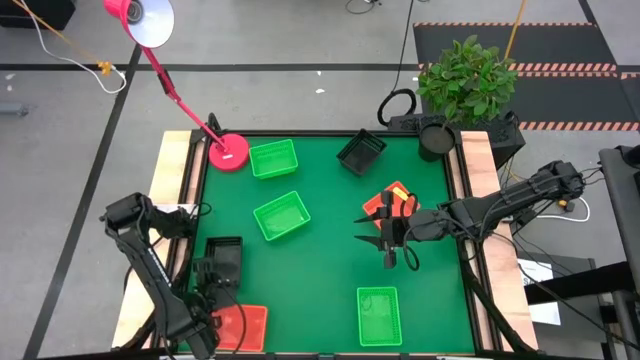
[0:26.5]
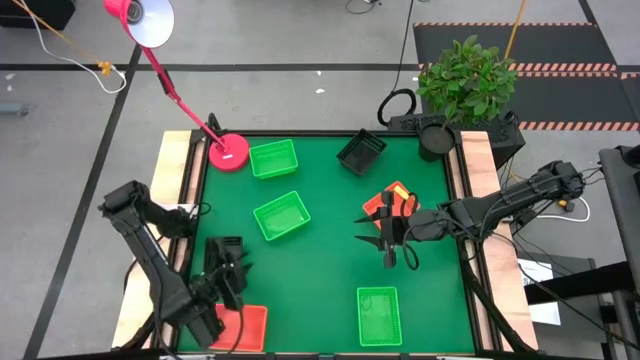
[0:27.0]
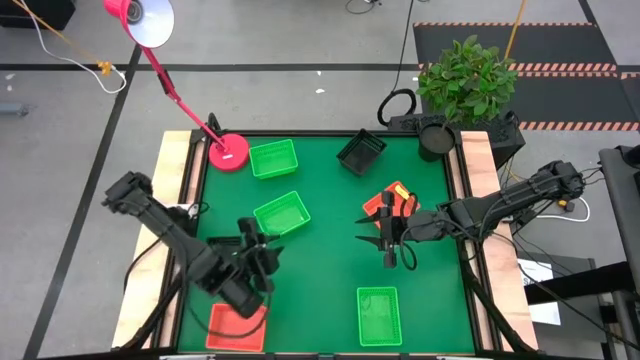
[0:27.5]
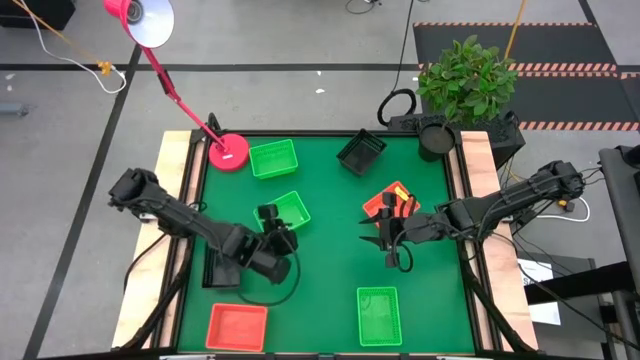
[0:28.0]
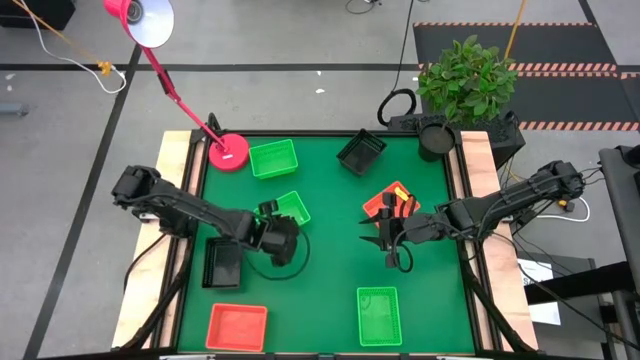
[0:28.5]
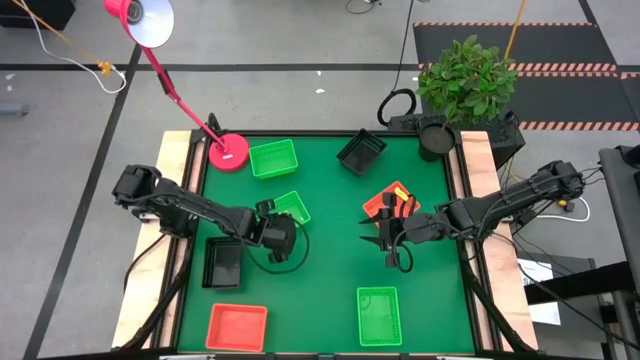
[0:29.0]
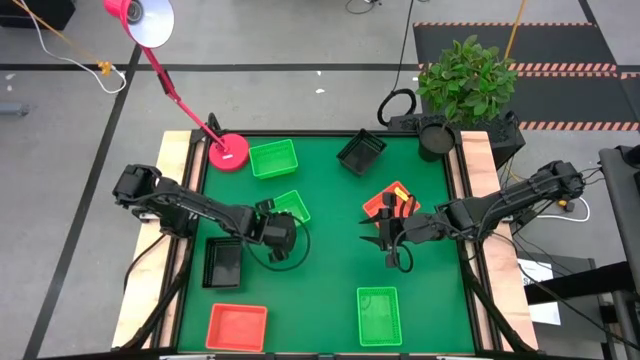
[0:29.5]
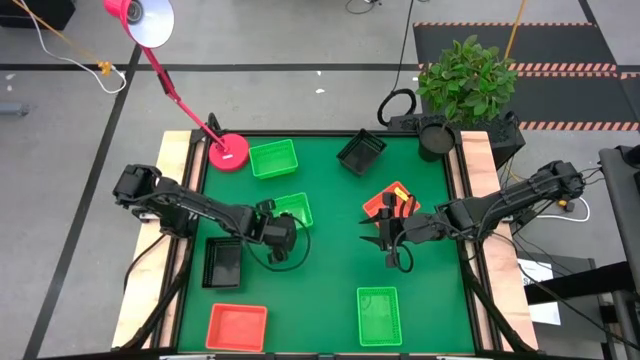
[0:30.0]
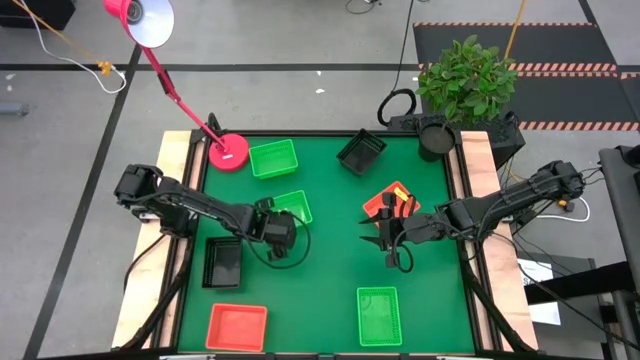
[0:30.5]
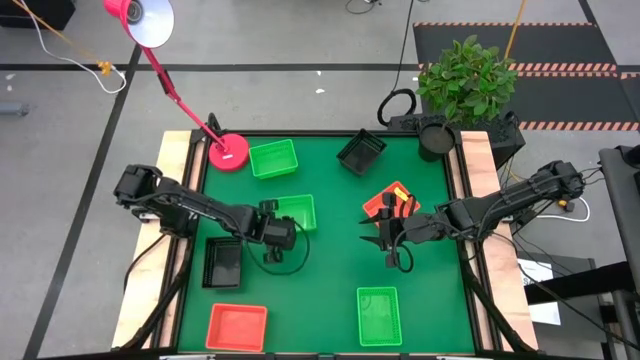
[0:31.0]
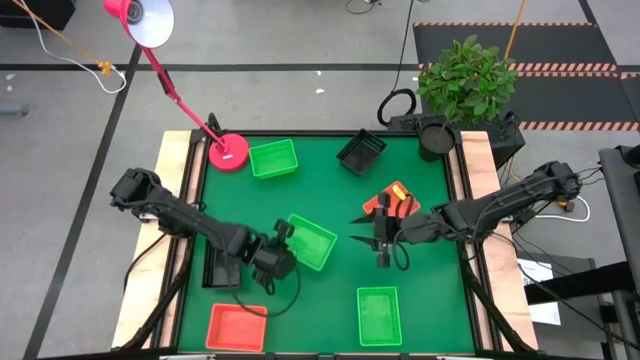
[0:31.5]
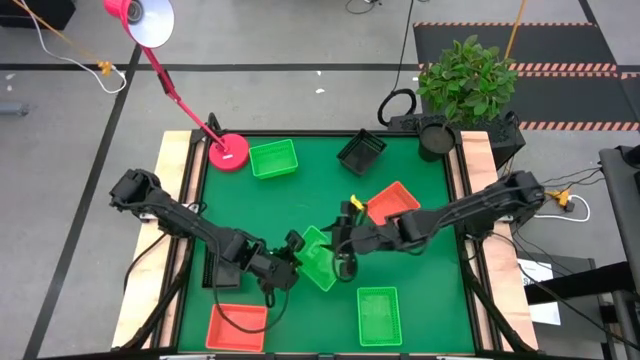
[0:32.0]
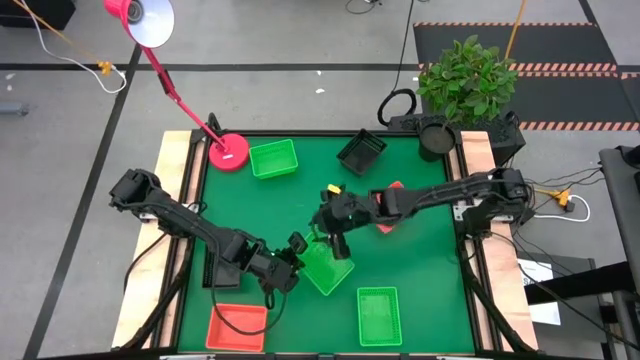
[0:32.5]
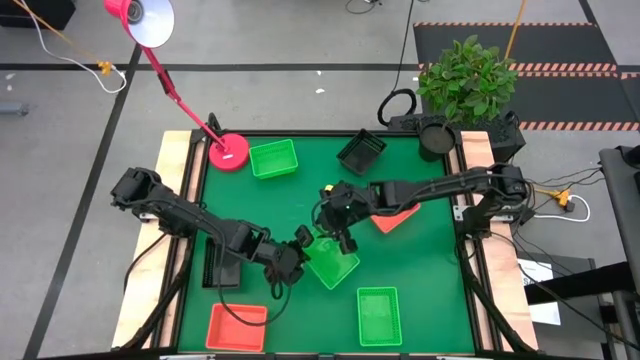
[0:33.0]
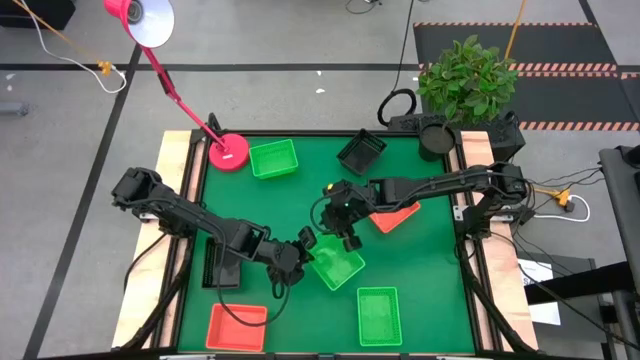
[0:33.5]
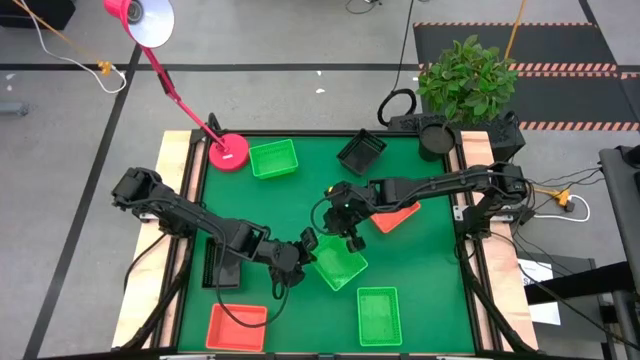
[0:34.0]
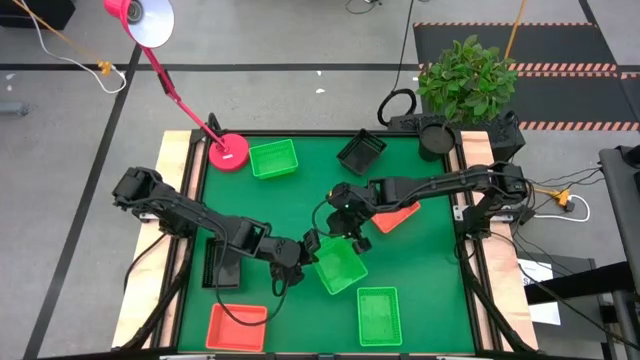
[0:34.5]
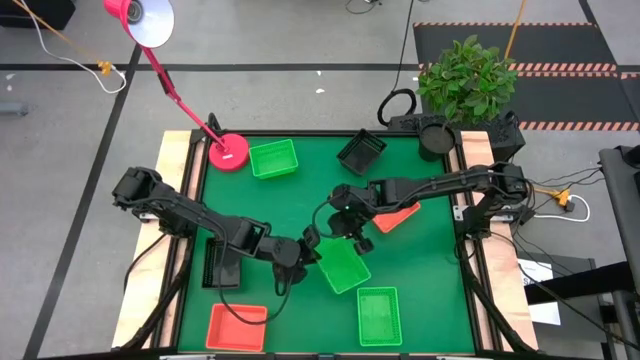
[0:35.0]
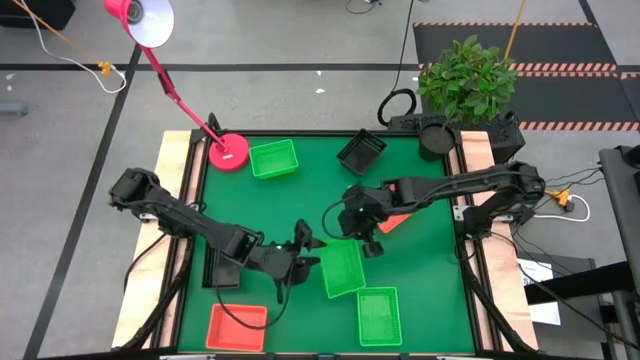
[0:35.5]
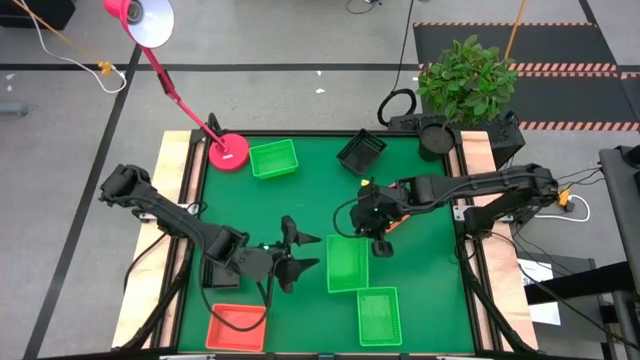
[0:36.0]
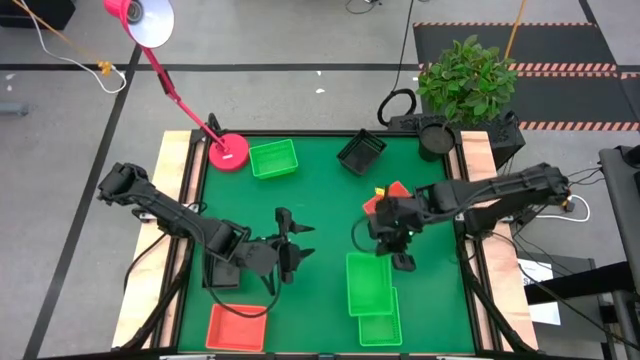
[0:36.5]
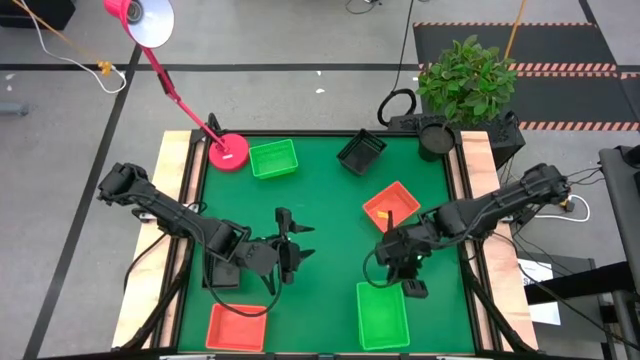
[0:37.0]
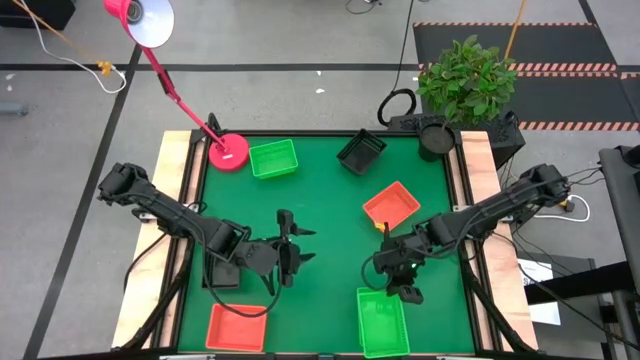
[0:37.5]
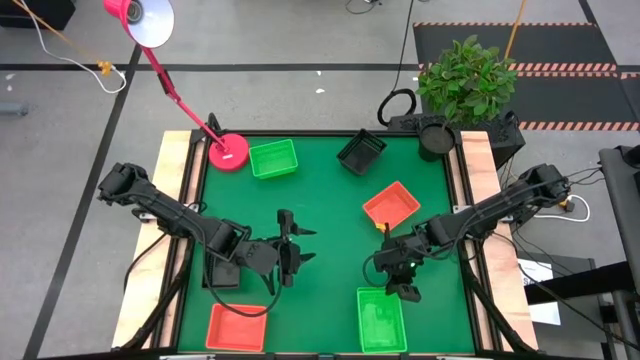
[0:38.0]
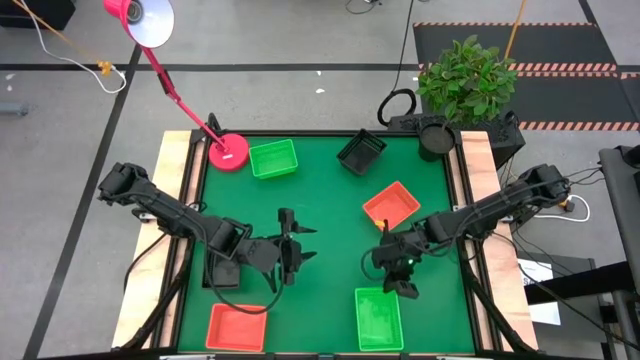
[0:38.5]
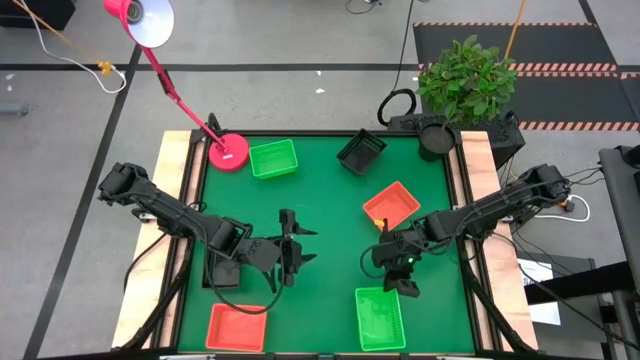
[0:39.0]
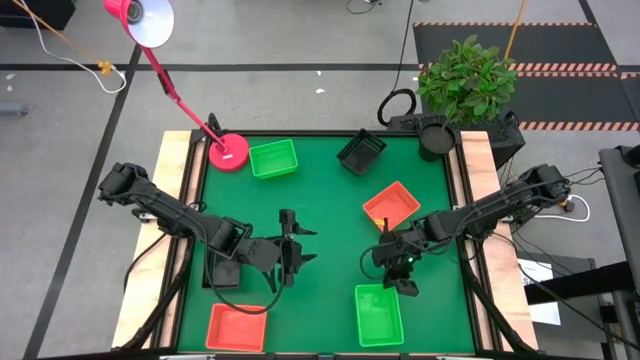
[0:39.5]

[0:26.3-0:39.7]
Stack the middle green bin on the bottom green bin

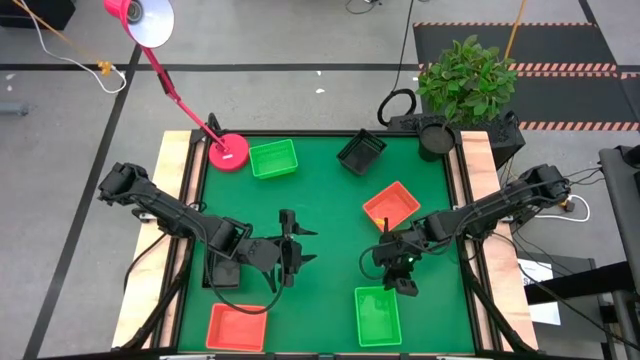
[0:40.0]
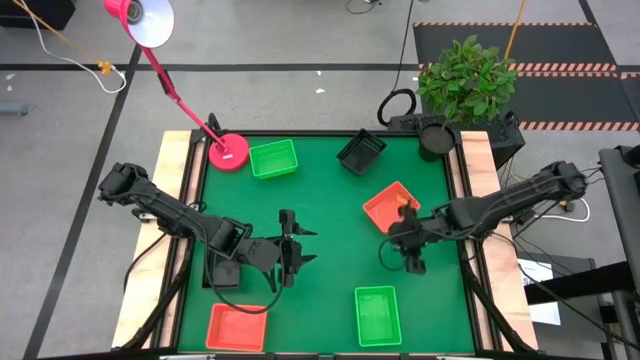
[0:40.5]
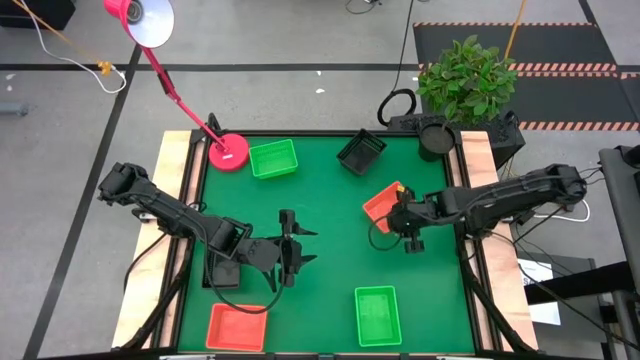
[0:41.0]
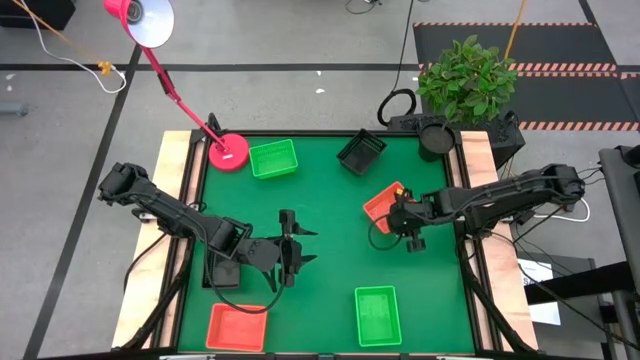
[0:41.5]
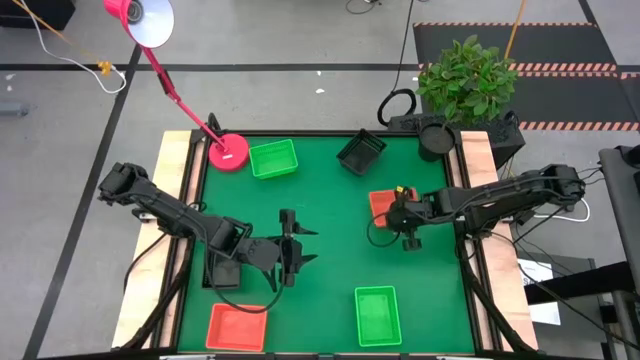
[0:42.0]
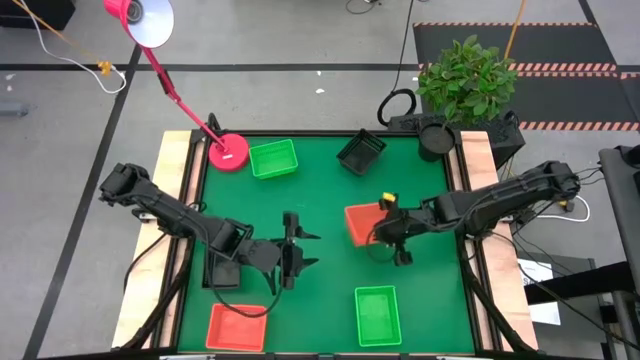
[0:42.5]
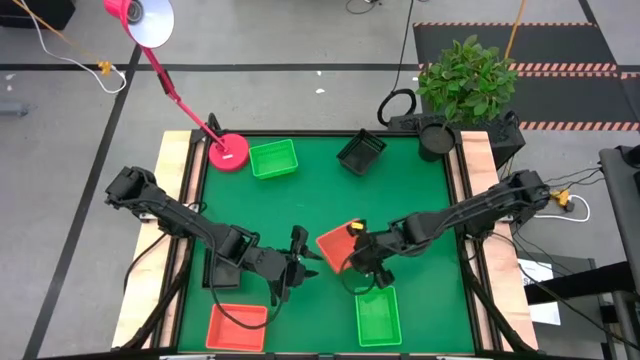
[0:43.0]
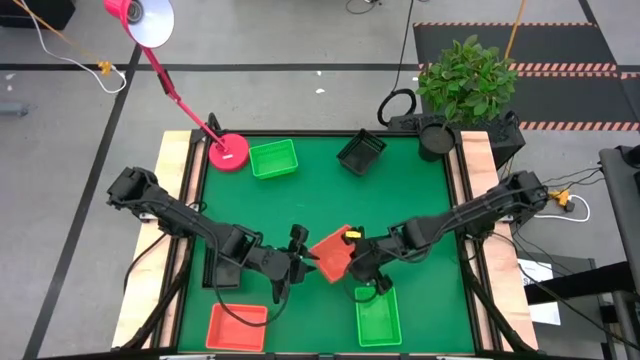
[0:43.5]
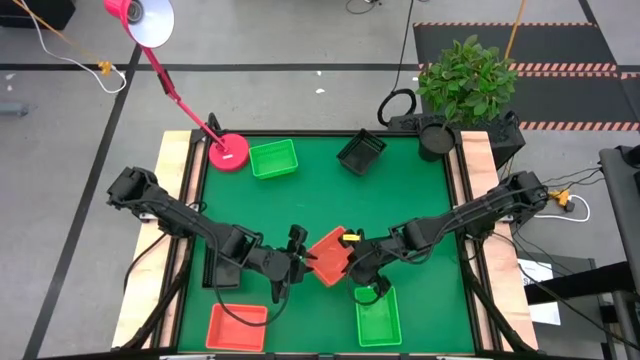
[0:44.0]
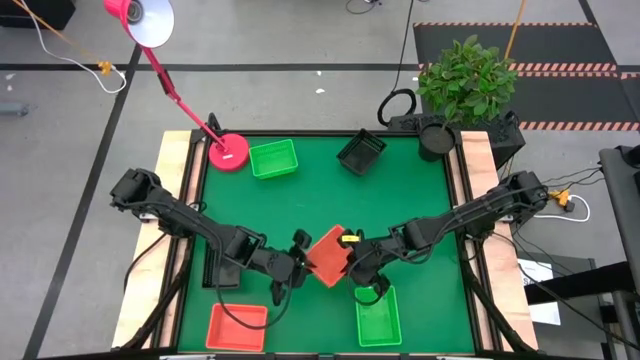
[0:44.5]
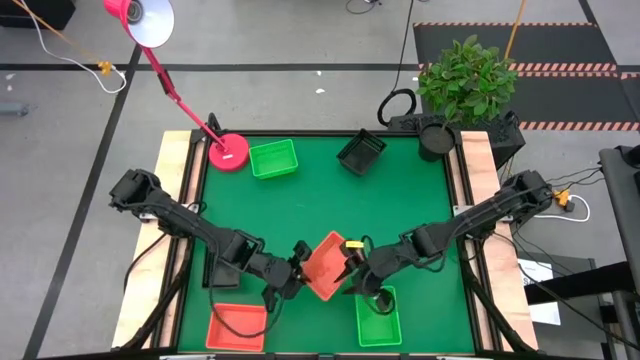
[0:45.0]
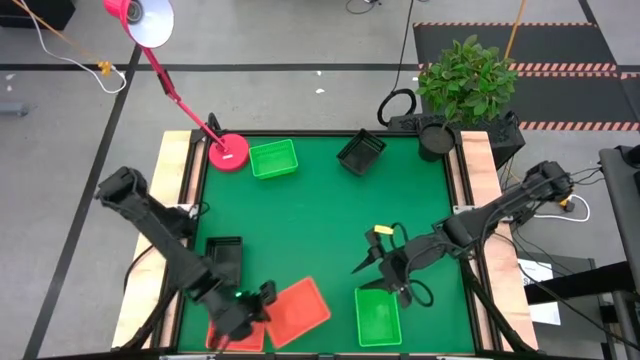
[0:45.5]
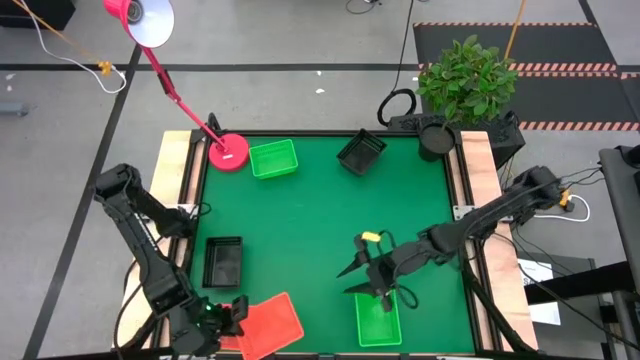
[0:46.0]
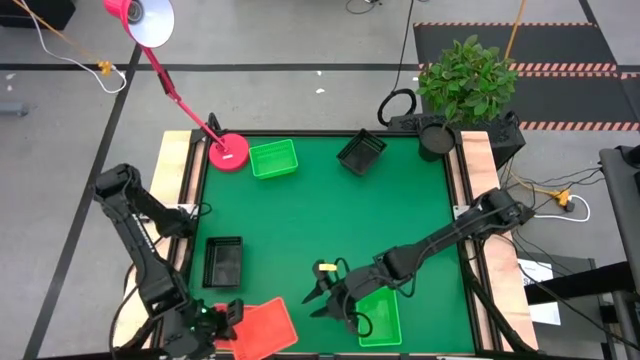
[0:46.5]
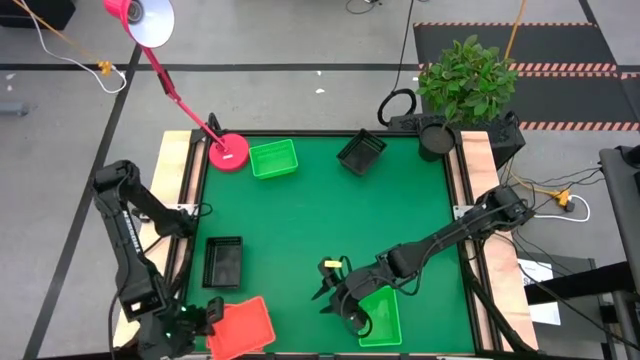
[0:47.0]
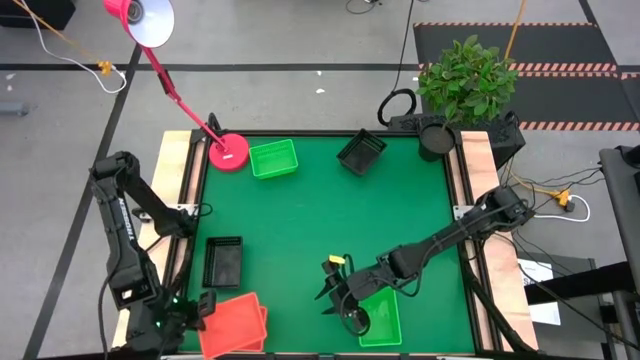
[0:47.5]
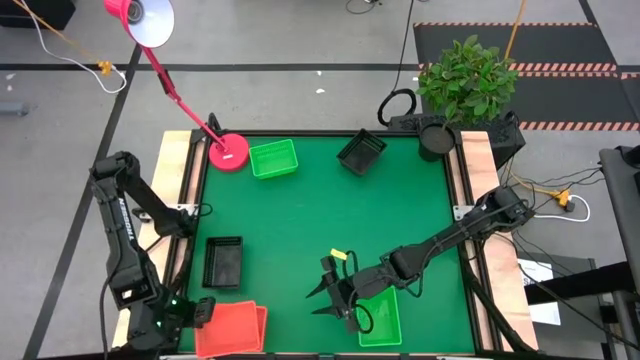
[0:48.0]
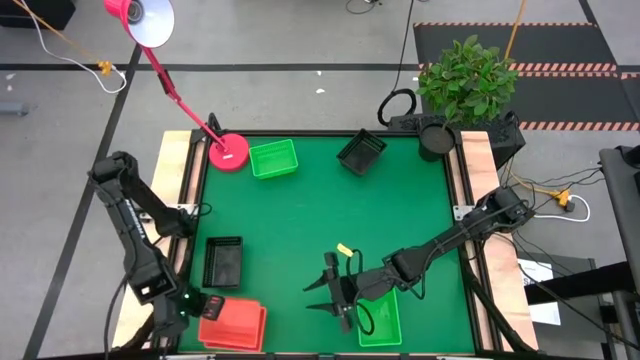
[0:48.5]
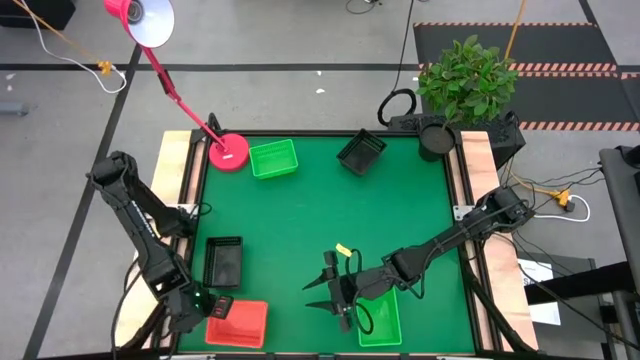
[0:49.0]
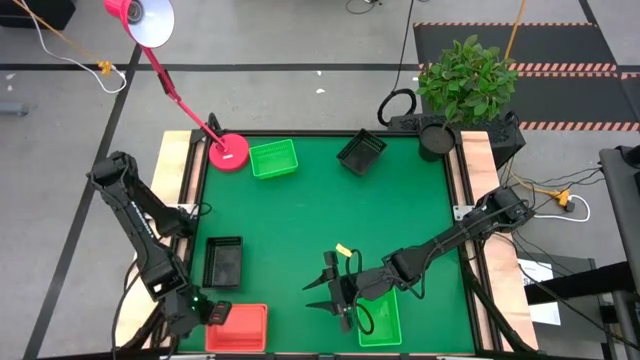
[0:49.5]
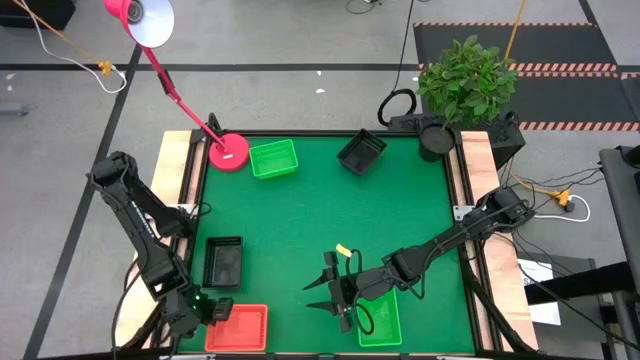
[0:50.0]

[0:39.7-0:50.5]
Stack the top orange bin on the bottom orange bin
